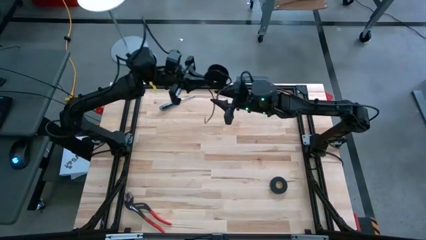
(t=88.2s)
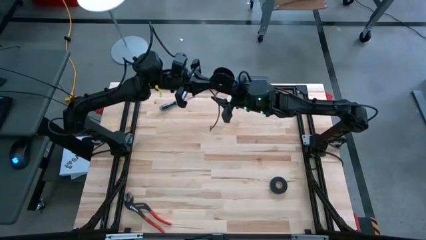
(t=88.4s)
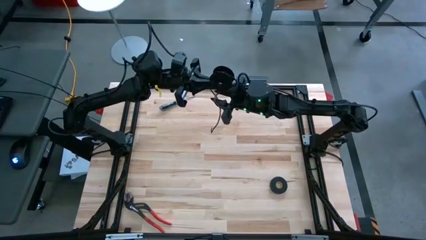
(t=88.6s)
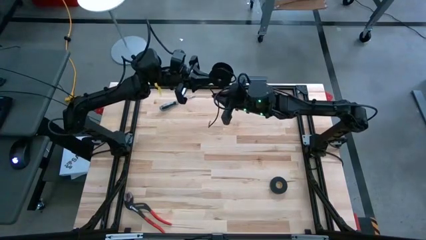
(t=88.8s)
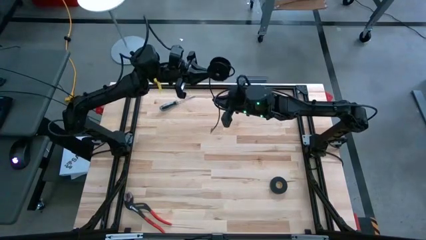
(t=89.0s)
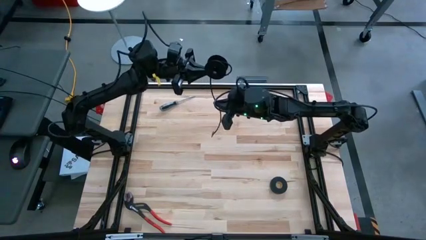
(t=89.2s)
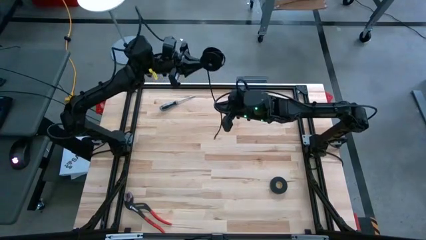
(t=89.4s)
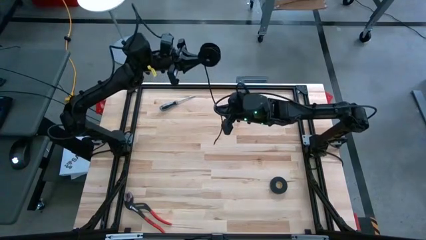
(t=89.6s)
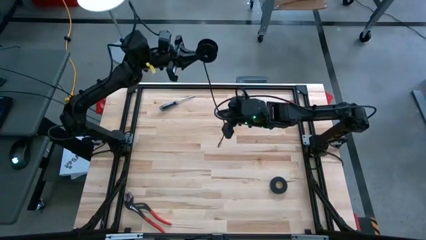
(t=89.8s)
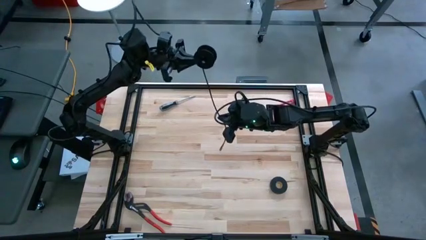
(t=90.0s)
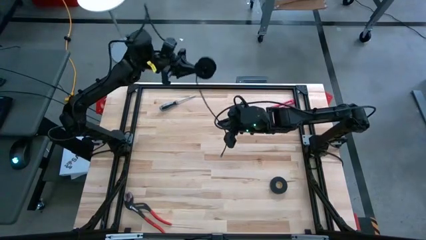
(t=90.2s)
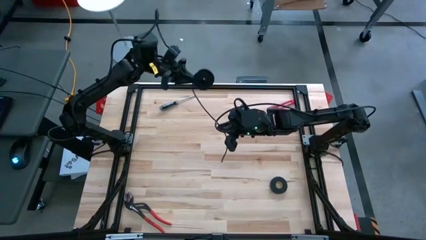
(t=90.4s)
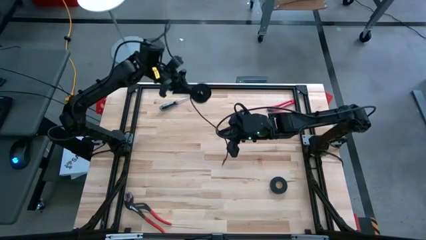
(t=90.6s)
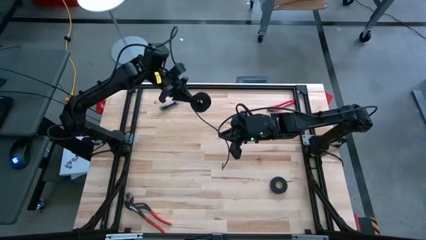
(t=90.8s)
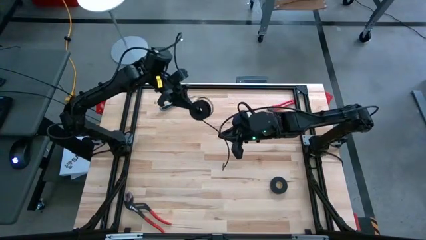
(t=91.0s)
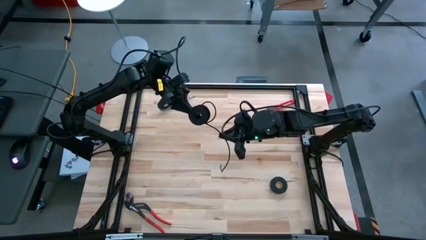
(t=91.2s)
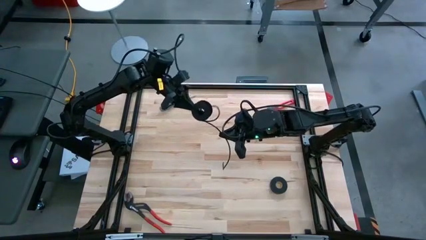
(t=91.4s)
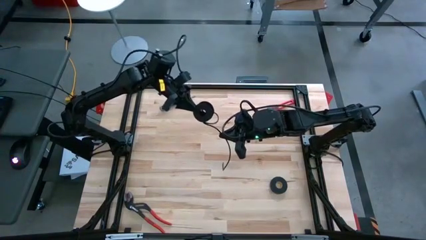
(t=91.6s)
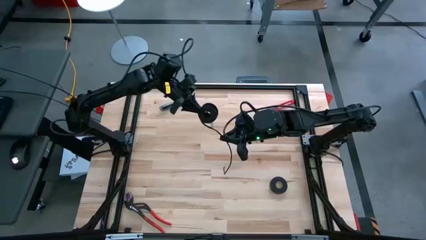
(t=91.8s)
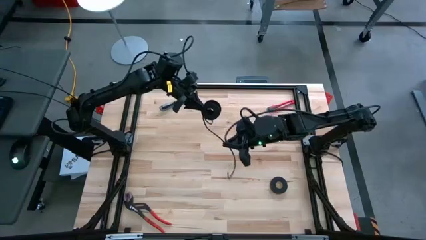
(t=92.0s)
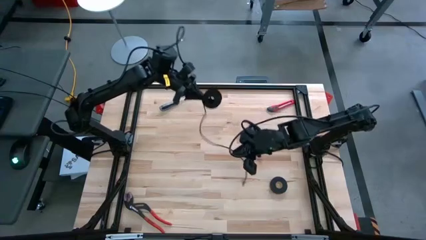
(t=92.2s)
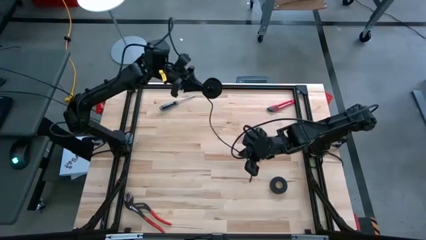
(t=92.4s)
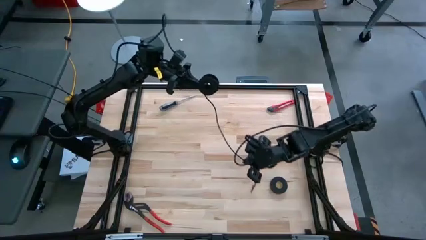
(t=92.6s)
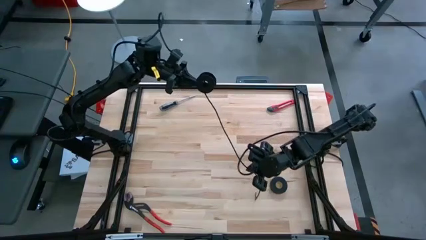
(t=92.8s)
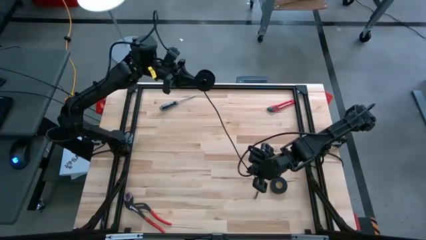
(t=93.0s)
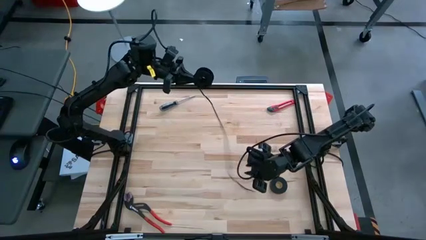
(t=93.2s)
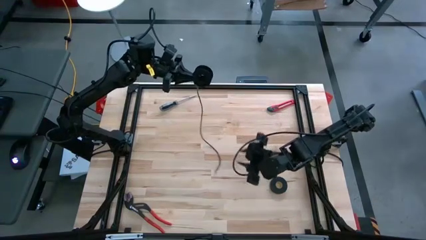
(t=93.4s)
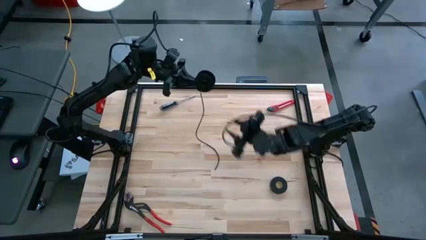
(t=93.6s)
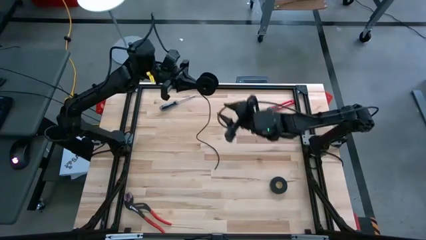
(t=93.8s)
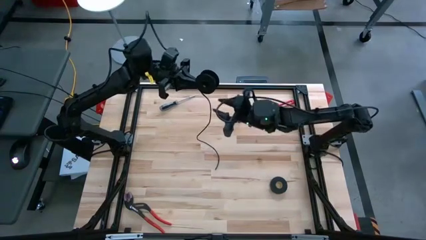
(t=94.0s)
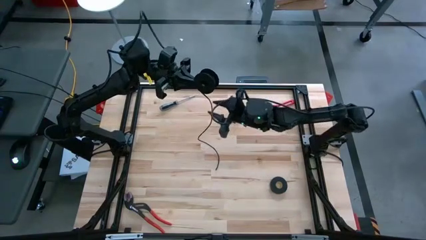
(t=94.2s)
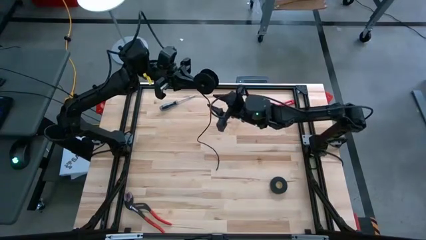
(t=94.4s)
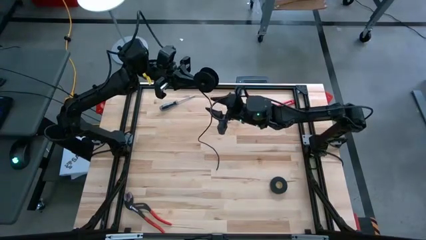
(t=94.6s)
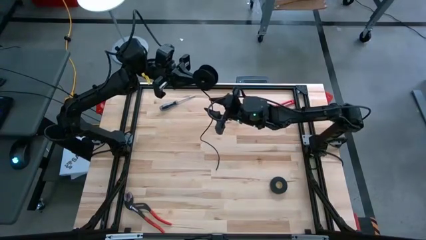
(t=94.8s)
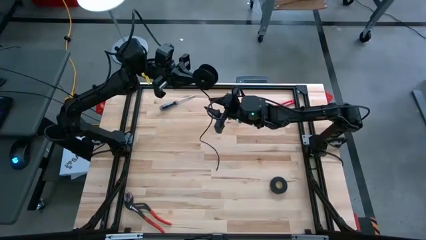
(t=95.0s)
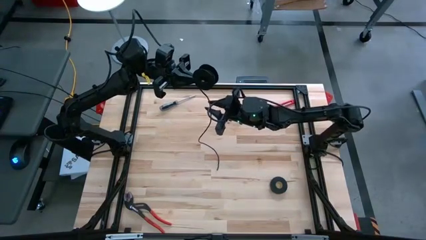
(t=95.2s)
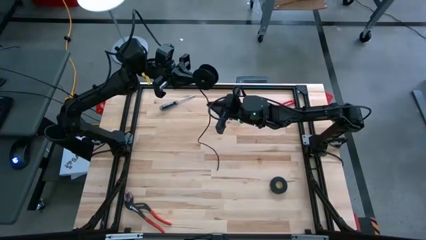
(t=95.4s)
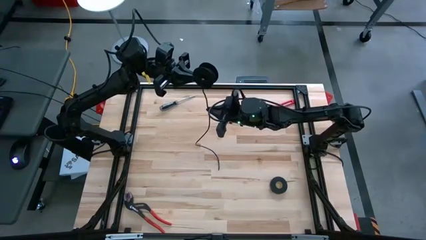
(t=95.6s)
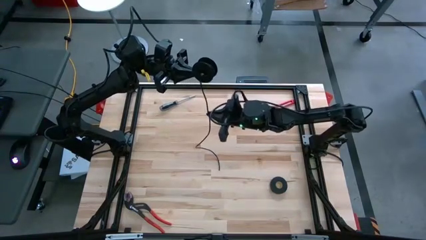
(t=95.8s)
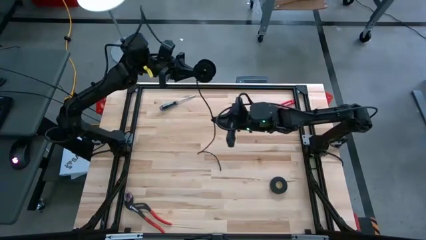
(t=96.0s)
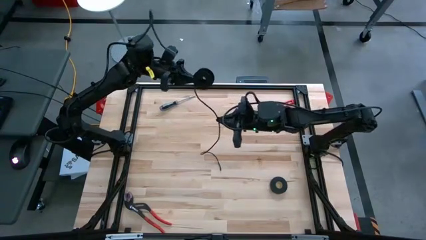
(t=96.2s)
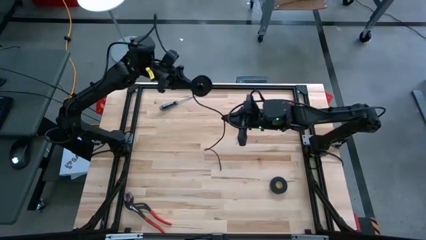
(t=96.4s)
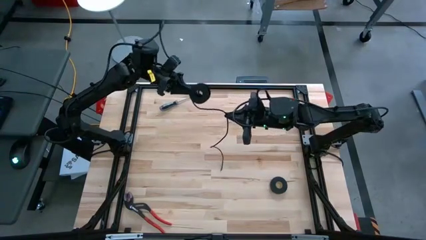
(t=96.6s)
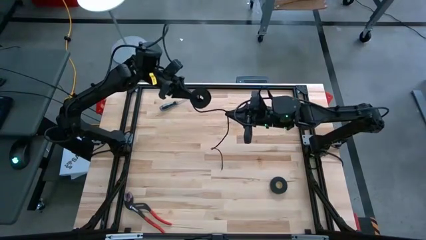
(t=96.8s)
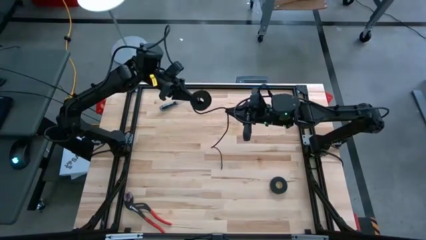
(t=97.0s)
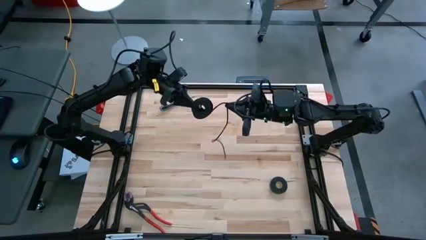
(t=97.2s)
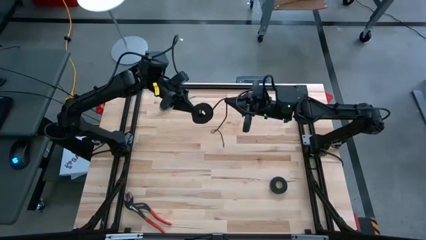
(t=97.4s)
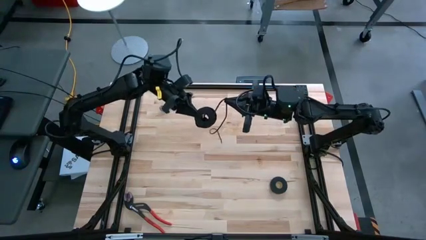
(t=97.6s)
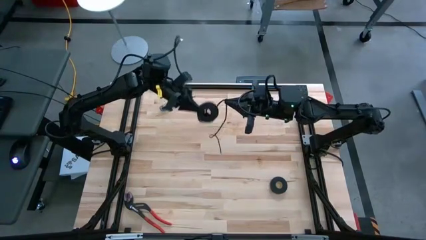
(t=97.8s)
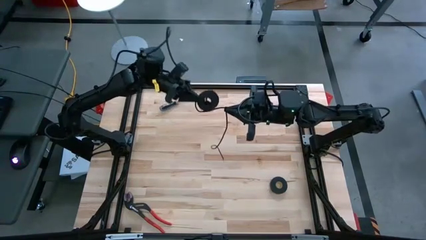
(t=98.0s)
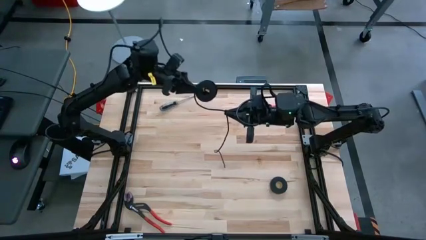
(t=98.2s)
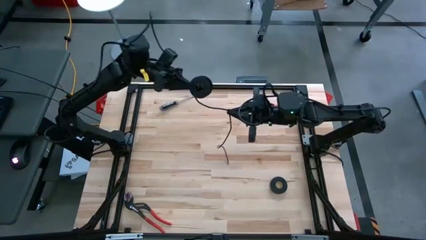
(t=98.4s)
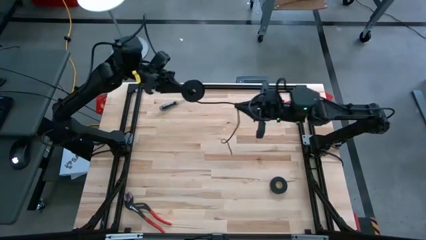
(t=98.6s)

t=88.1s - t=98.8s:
Task: Coil cords
Coil the black wire on the black spool

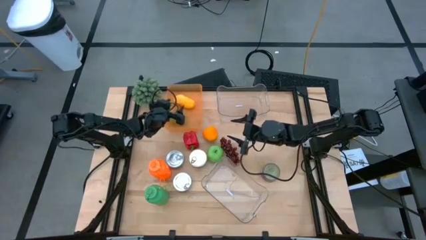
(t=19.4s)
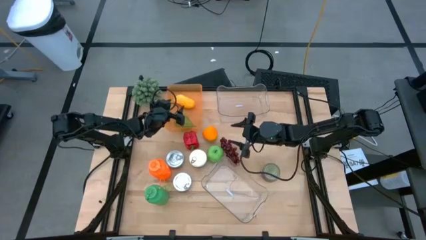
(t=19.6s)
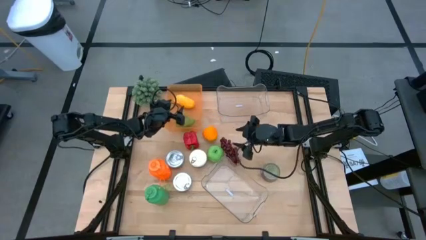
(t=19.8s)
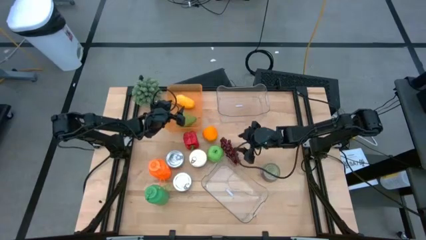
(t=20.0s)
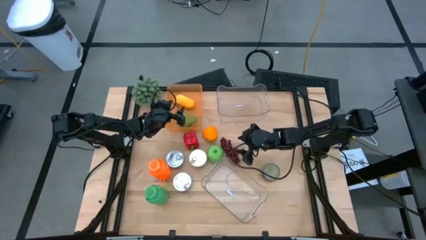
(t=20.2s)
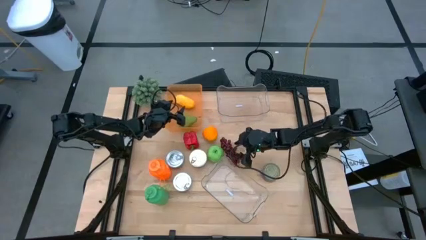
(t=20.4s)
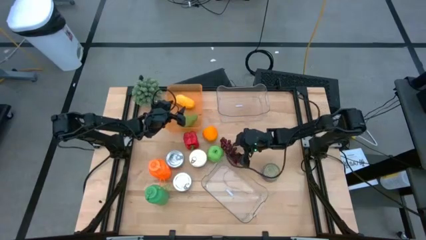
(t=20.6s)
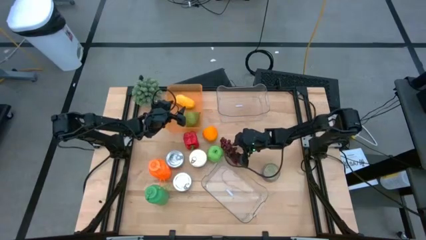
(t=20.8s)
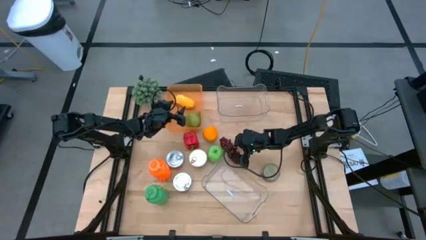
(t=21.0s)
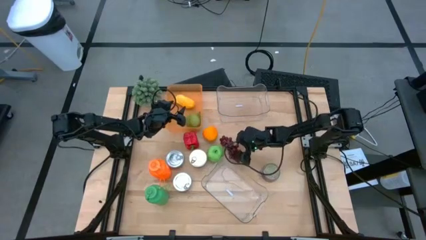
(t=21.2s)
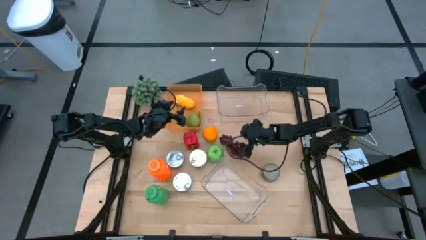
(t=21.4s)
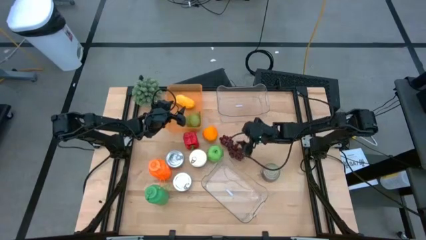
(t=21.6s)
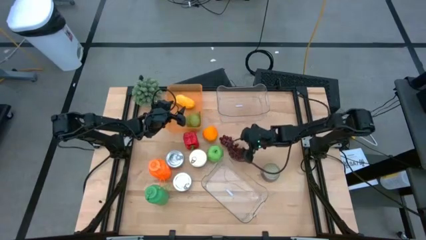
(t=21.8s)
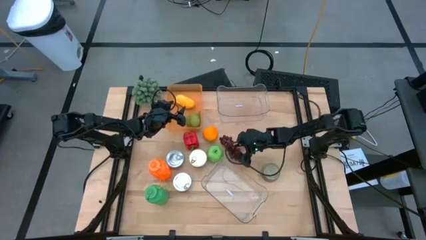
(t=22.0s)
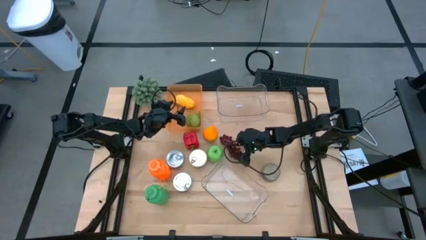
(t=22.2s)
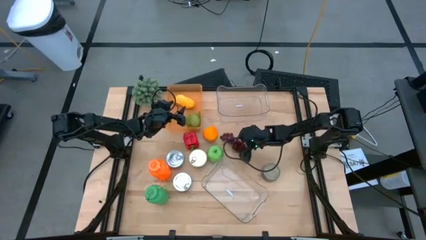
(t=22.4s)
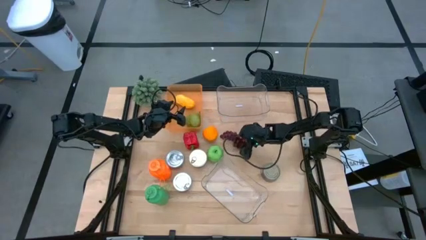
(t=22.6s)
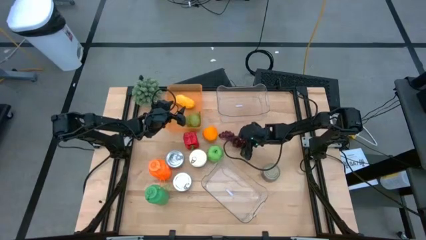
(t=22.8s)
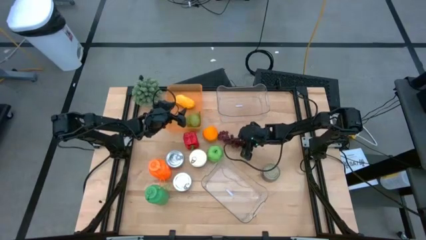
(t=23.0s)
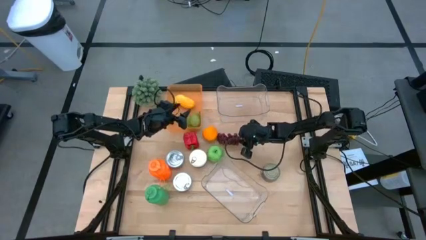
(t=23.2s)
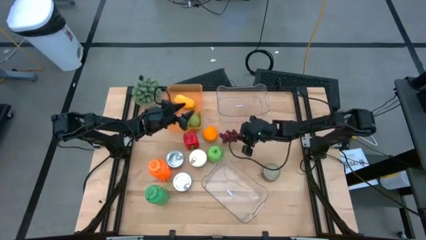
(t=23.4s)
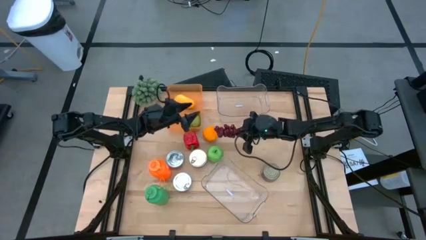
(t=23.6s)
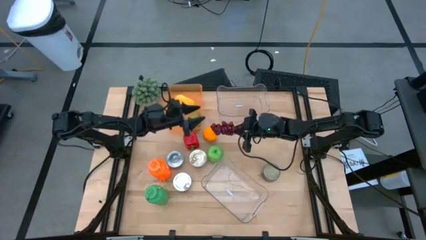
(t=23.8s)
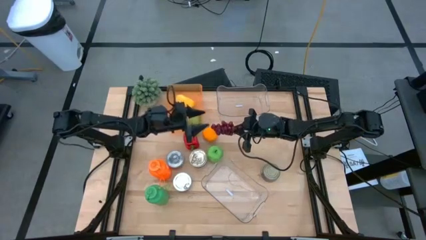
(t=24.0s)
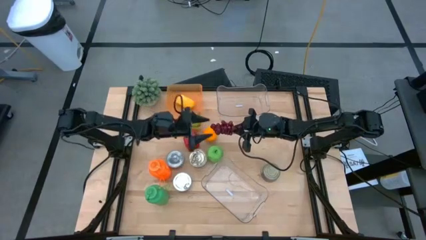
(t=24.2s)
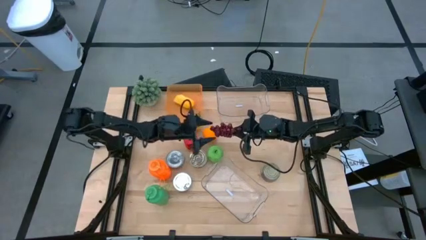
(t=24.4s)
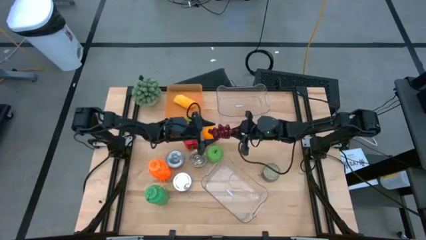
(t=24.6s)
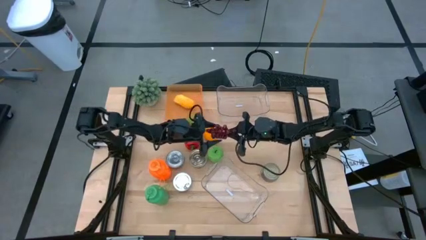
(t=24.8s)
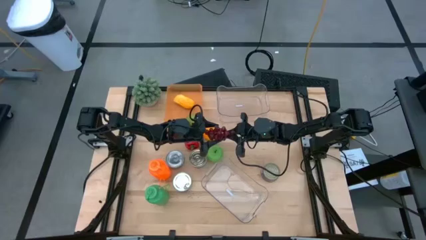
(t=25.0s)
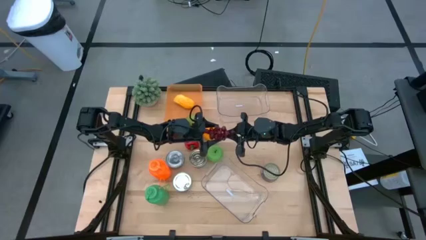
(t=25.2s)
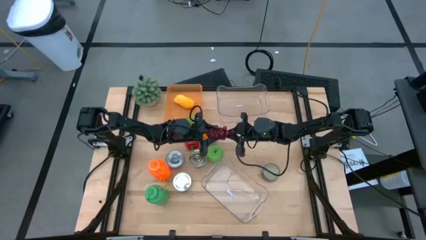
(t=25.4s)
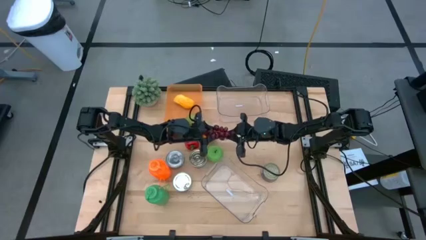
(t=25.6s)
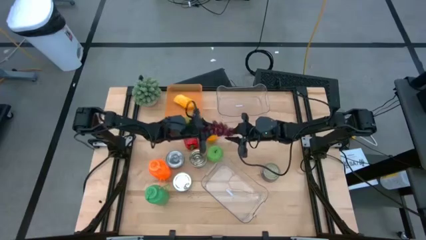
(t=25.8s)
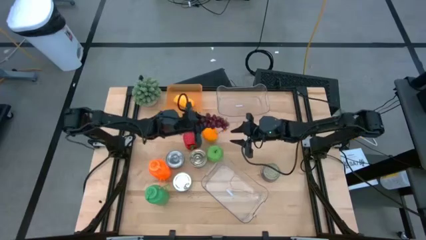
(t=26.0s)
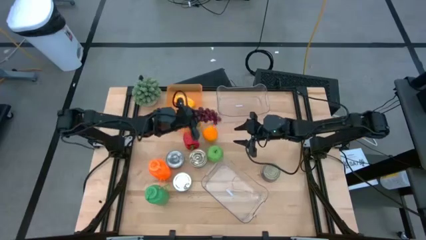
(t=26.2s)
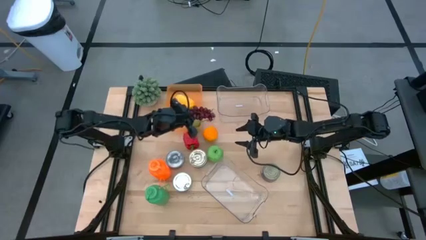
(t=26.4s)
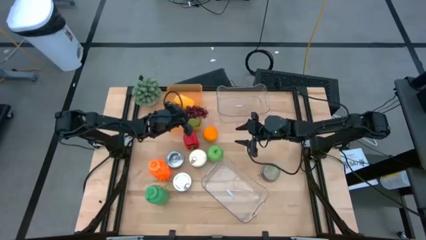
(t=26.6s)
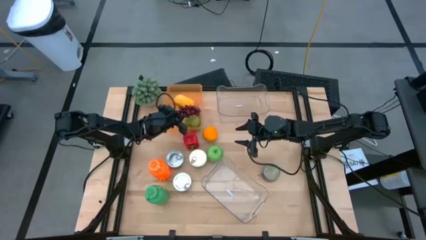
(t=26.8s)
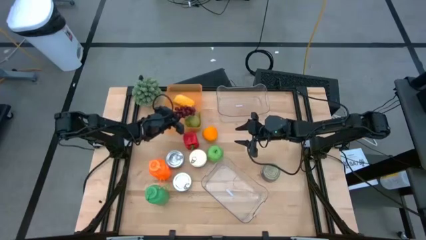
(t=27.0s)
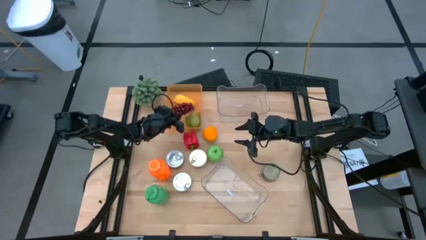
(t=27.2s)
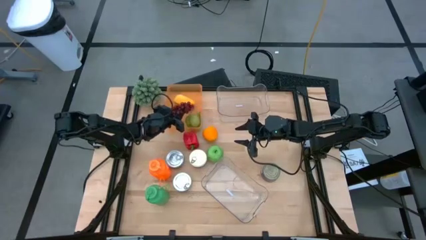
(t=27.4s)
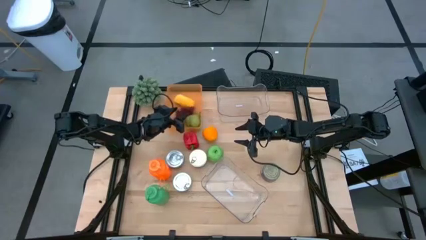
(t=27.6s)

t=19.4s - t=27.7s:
Task: Pick & Place Food Item
Put the grapes into the orange bin
